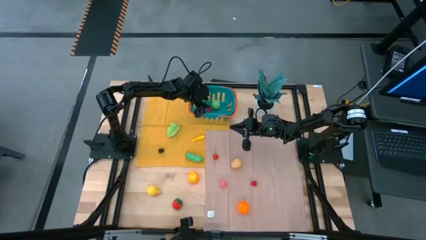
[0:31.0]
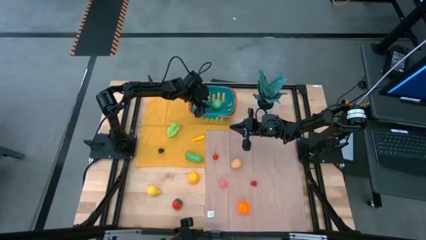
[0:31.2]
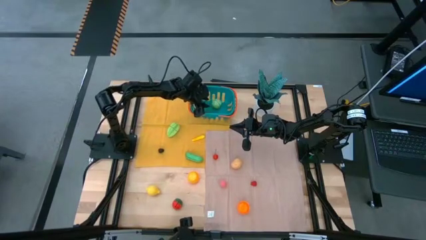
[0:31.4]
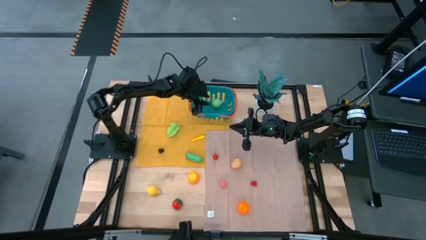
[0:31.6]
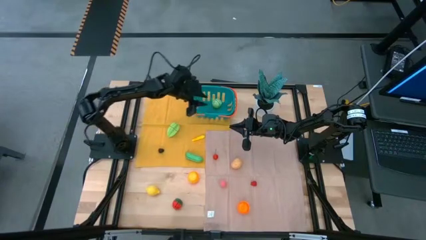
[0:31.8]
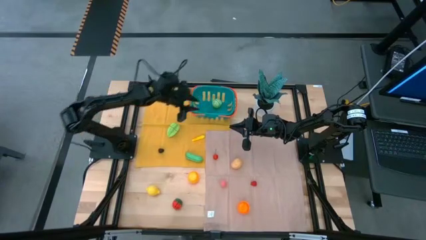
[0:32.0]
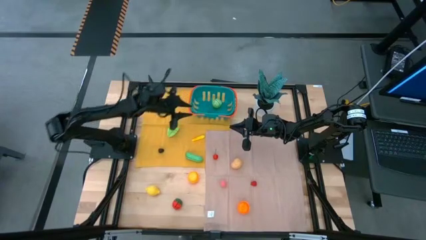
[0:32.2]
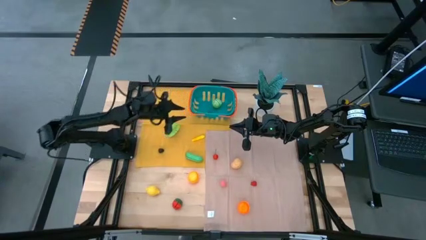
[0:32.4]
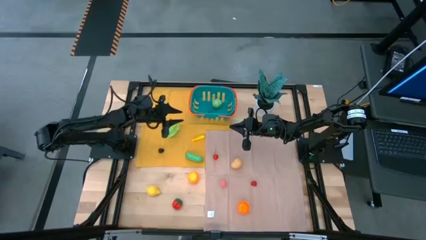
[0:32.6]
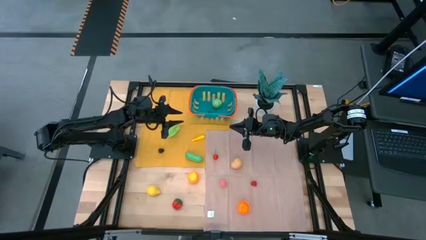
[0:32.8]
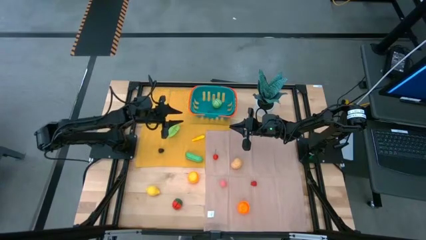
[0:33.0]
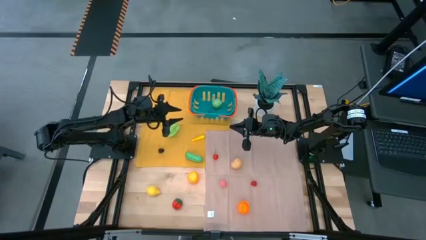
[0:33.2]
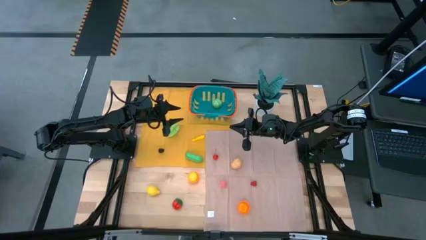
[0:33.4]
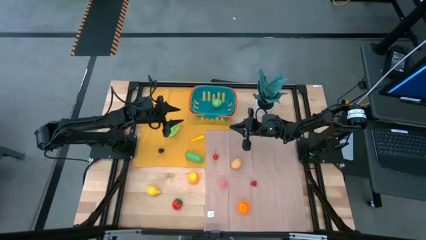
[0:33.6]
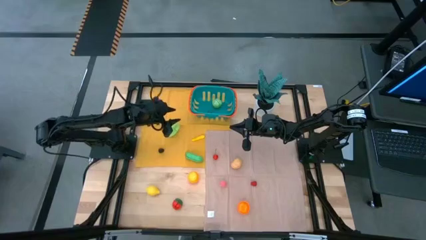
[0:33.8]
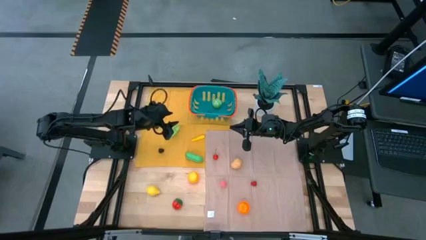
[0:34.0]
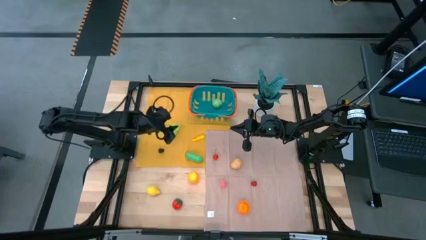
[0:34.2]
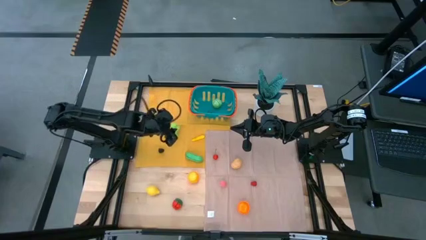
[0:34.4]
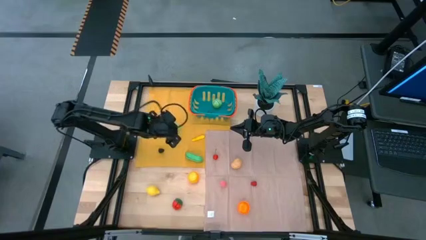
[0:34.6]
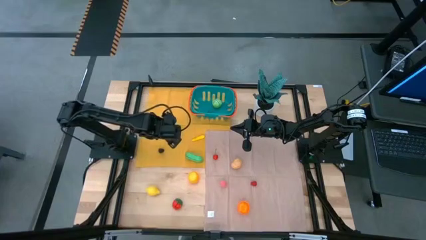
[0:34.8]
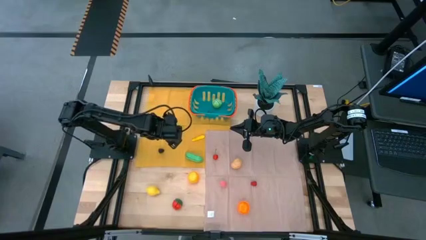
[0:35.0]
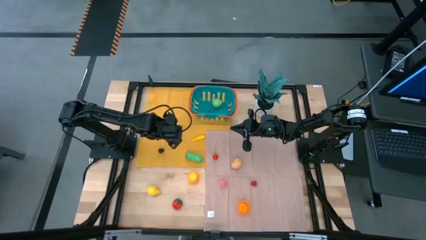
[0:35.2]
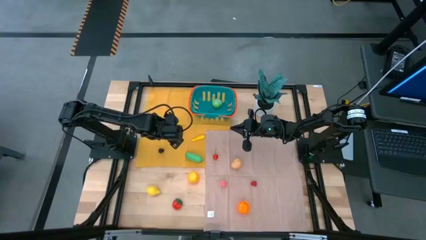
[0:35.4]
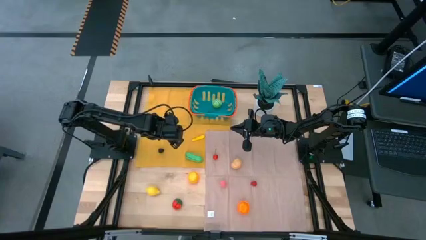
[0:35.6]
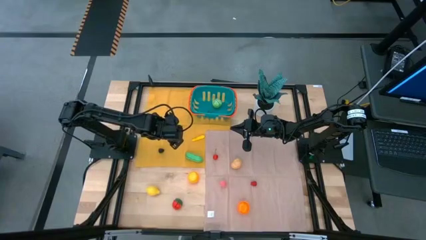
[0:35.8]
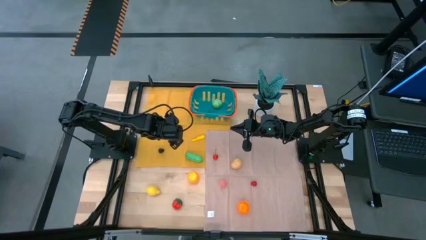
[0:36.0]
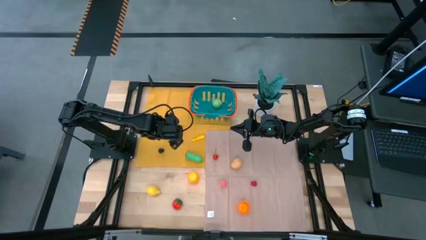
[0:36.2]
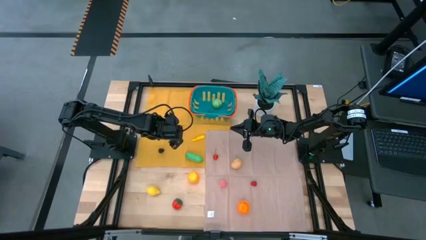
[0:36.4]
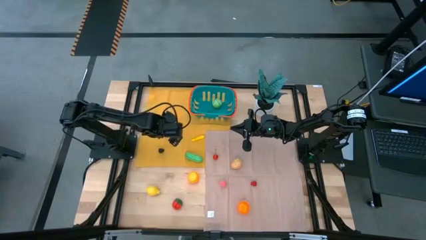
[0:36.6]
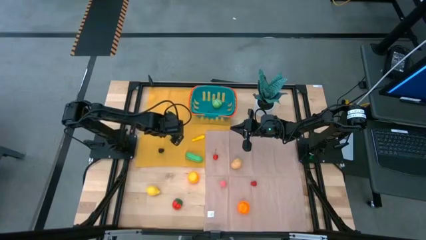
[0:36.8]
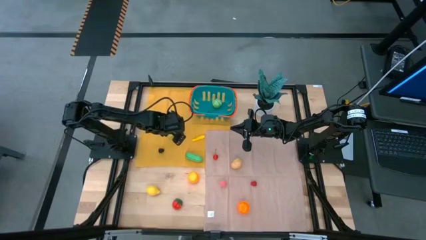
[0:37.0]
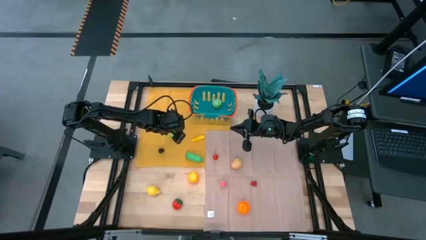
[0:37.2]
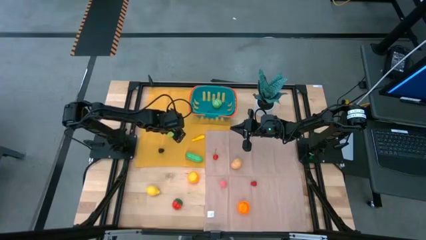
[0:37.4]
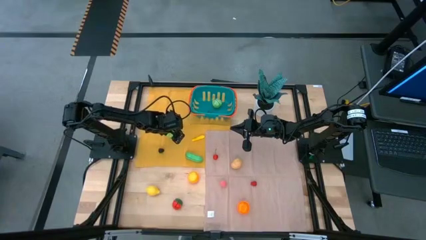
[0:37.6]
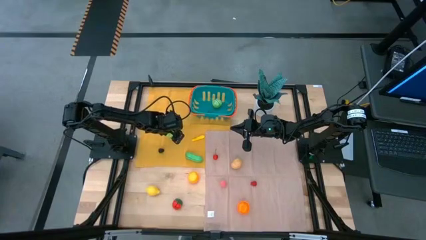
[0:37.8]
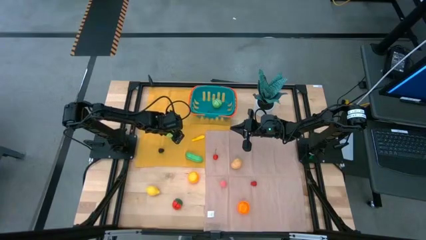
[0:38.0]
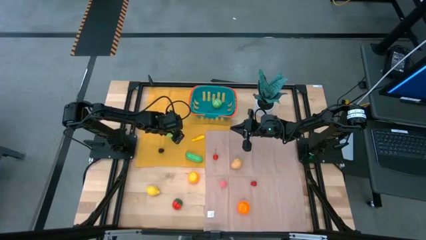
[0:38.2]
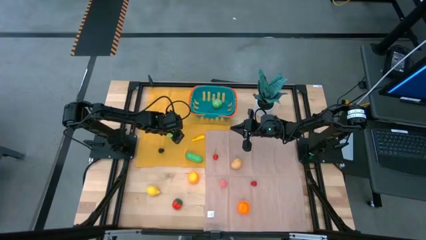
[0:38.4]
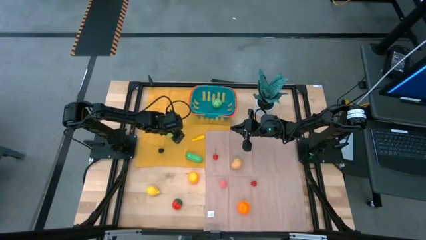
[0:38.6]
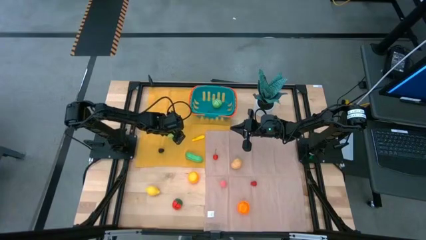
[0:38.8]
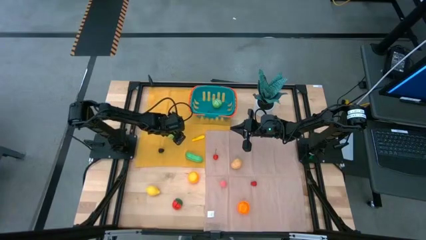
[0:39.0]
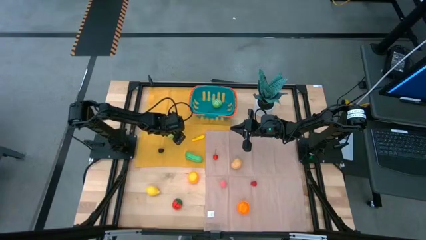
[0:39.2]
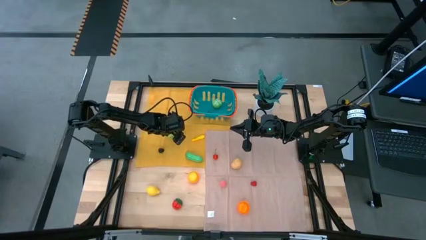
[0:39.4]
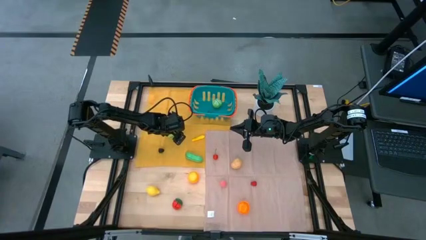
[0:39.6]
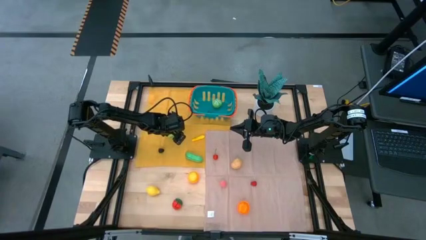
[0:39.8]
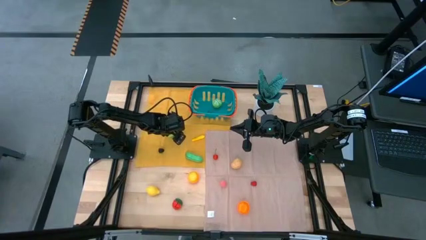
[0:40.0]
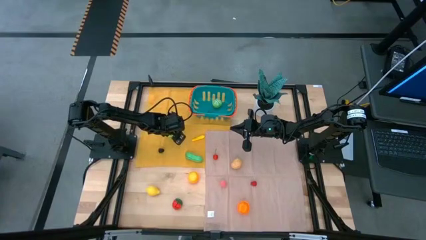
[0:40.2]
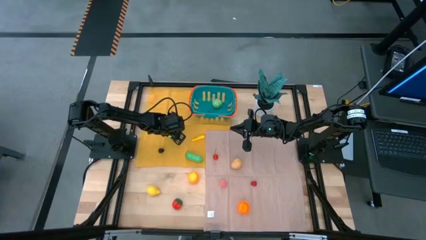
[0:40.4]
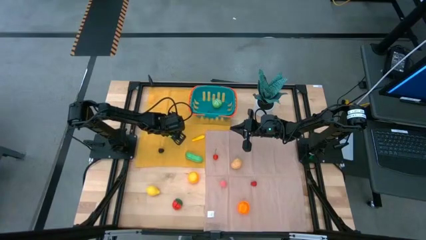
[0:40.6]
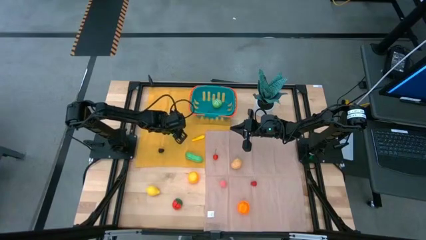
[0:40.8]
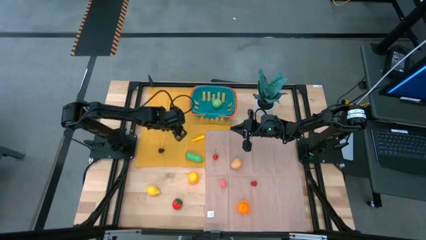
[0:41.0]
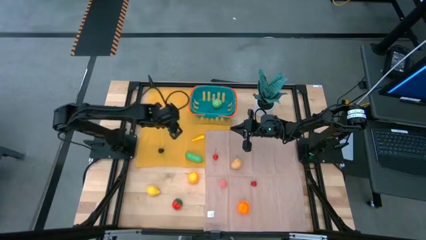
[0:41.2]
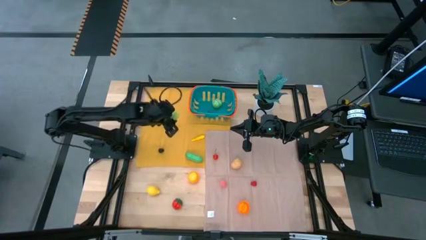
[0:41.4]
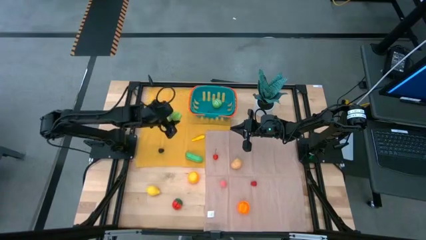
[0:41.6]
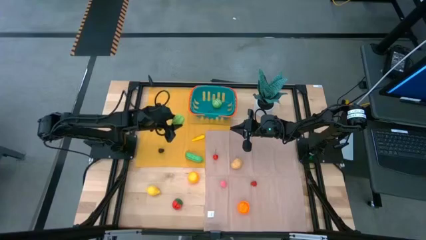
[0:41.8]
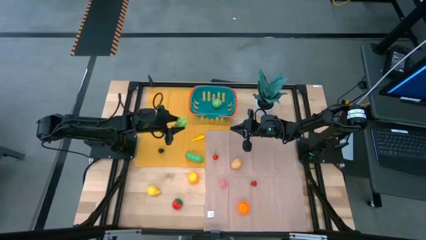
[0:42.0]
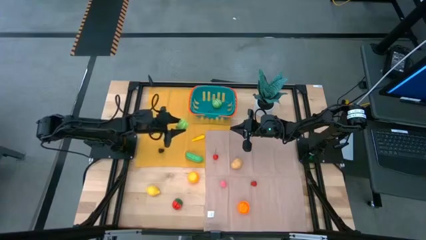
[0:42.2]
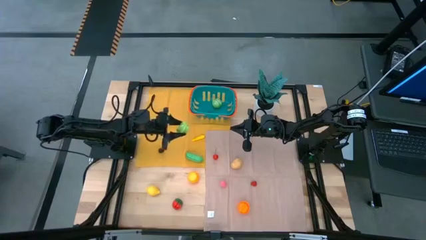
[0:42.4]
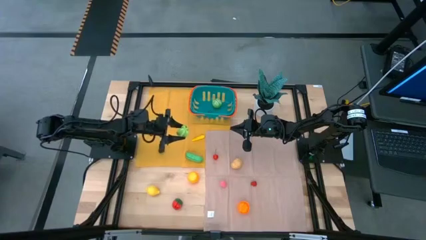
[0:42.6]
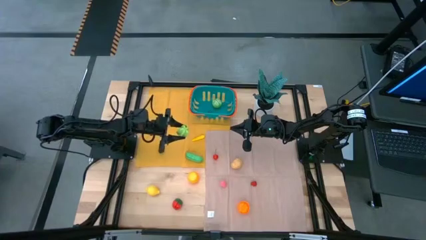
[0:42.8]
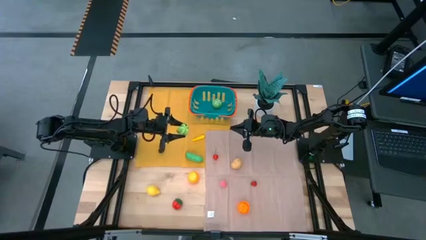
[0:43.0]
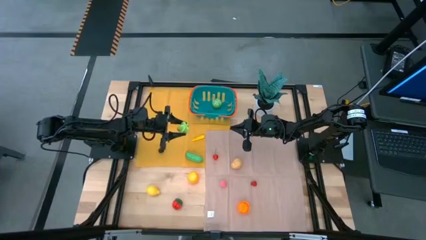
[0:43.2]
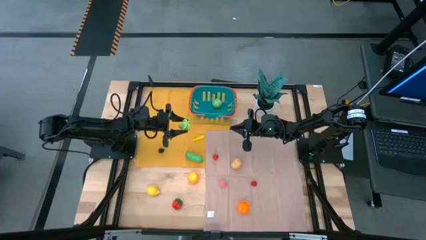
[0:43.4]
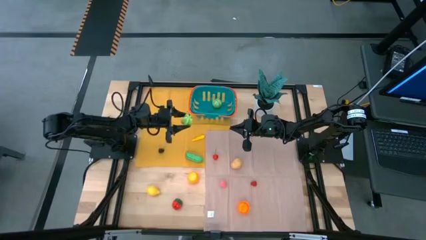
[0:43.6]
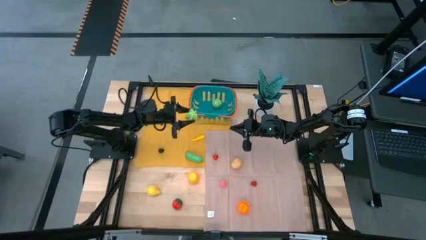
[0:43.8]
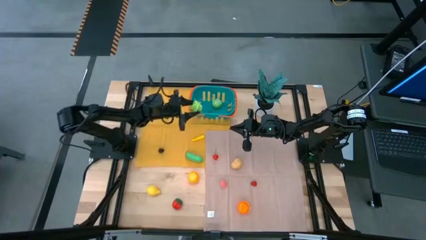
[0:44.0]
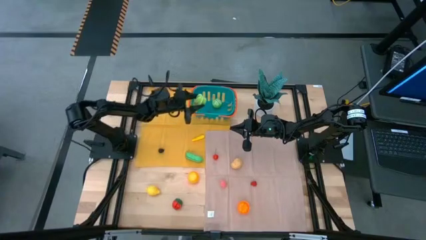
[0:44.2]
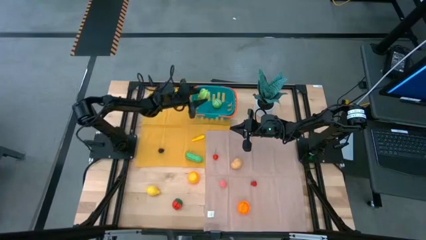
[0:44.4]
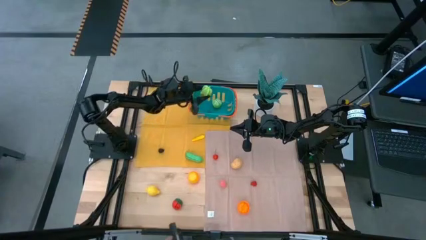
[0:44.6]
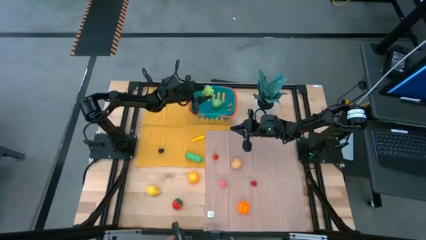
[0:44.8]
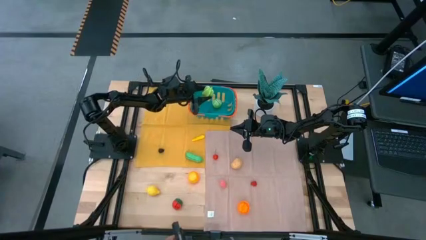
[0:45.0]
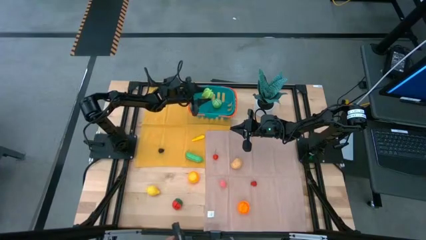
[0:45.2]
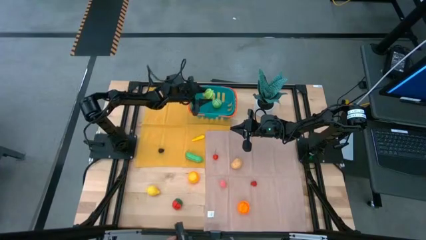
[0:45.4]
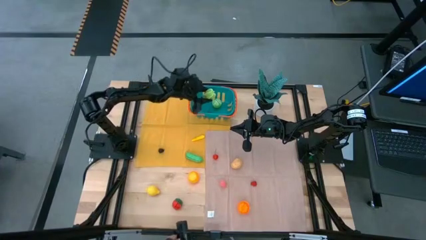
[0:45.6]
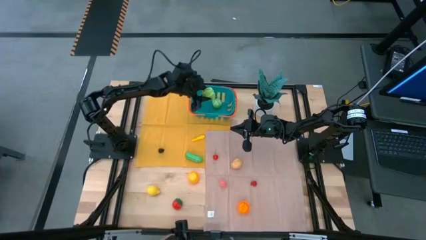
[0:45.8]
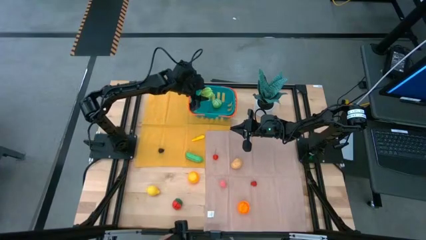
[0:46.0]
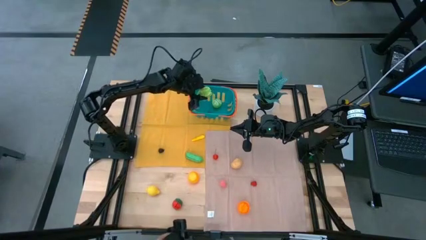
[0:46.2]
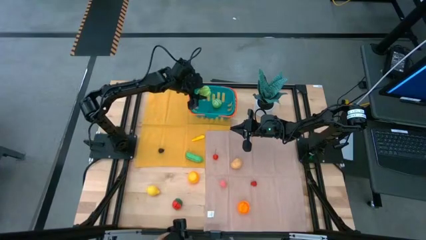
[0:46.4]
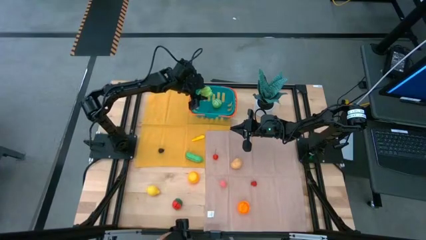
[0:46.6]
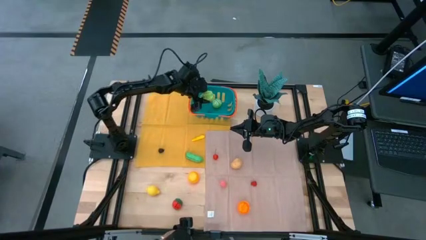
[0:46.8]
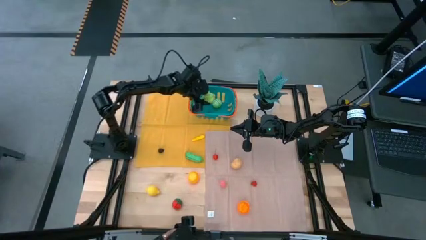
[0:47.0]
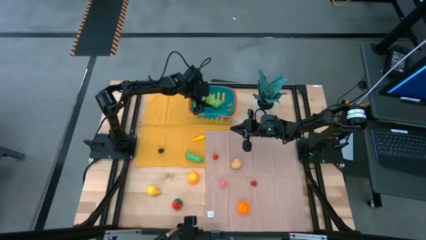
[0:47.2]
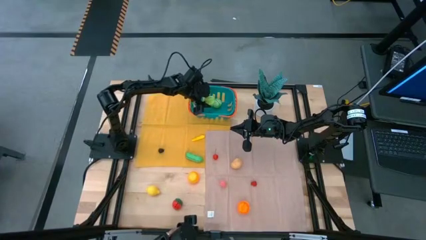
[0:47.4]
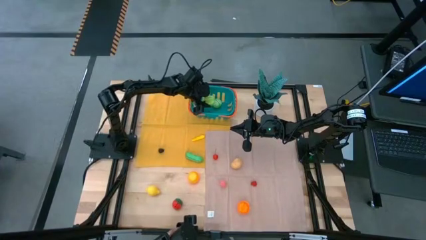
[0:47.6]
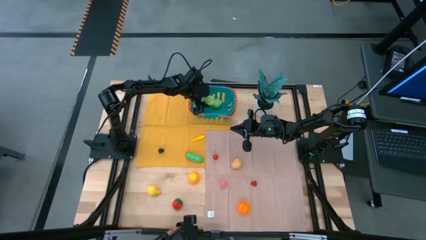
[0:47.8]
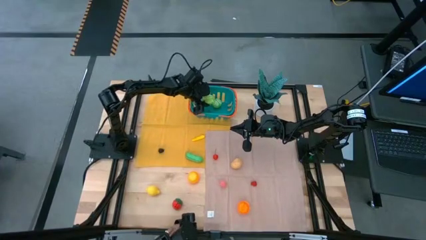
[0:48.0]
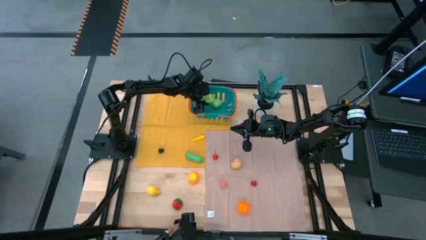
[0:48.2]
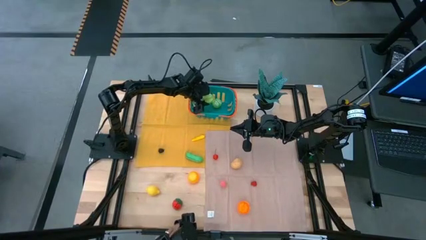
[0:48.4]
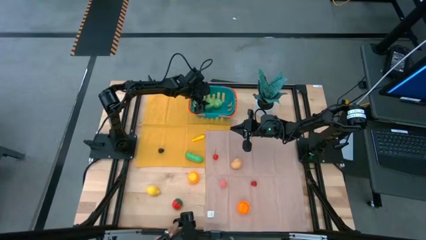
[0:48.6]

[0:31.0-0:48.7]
Task: Pick and placing Produce into tupperware
Put the green starfruit into the blue basket
